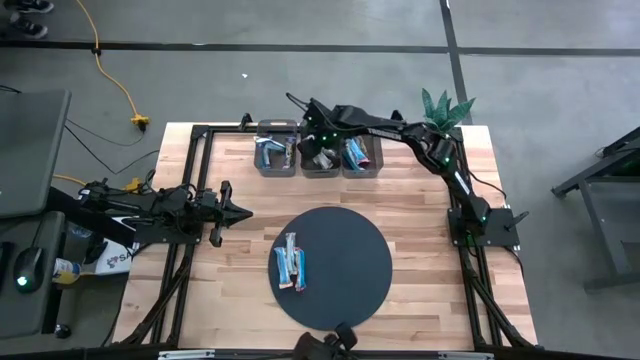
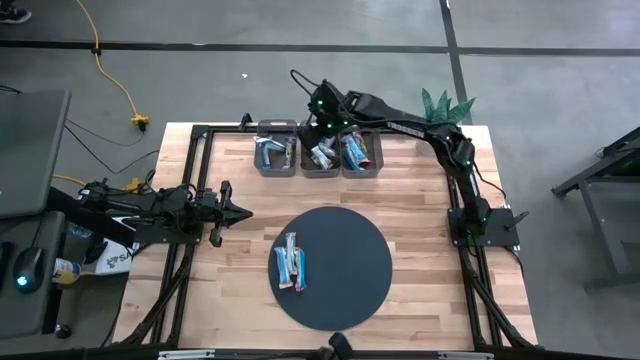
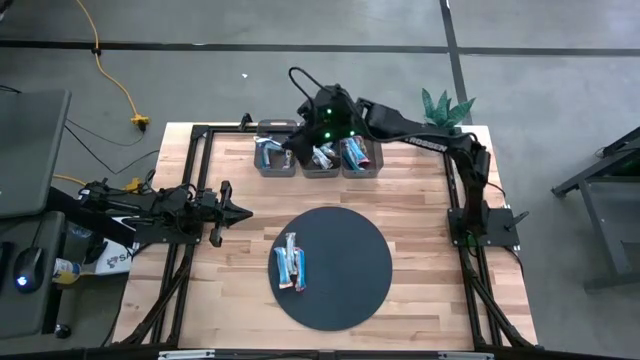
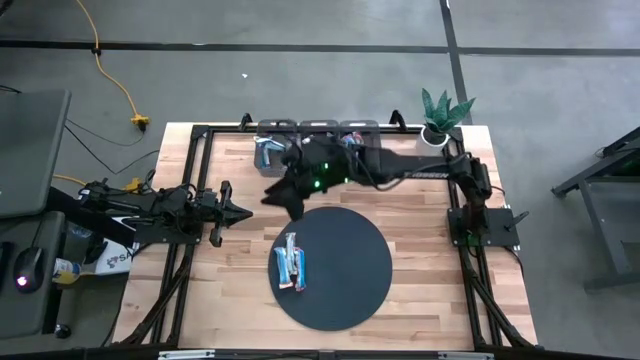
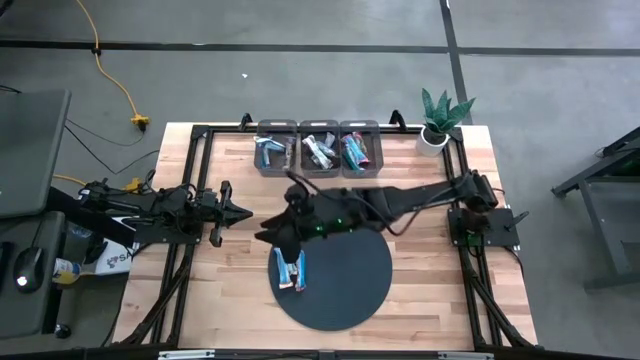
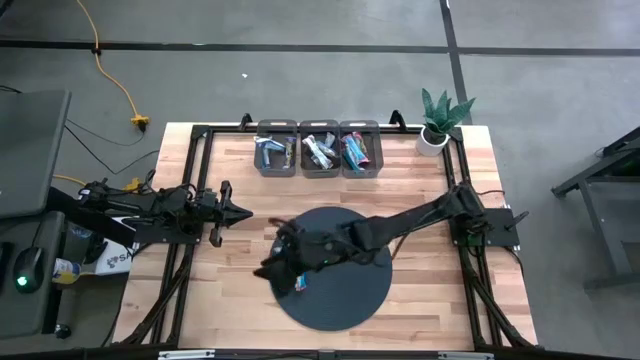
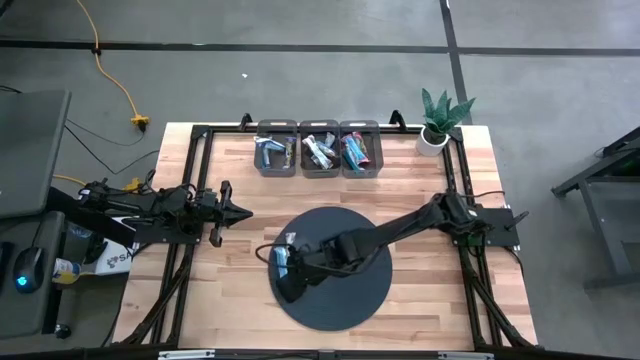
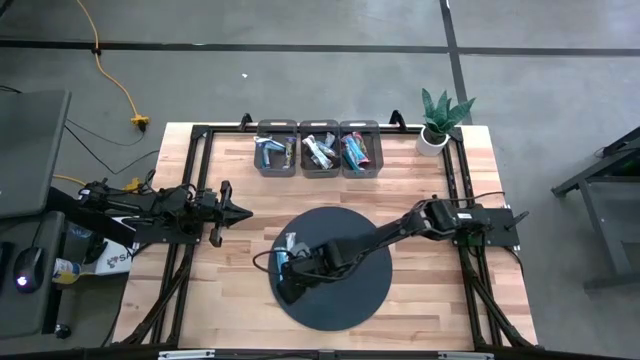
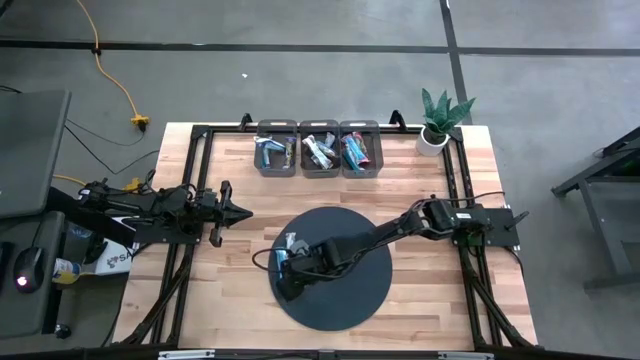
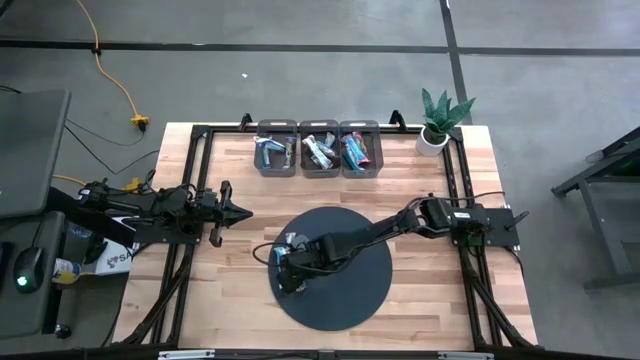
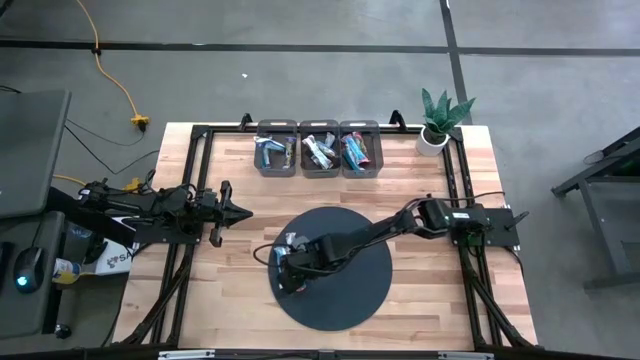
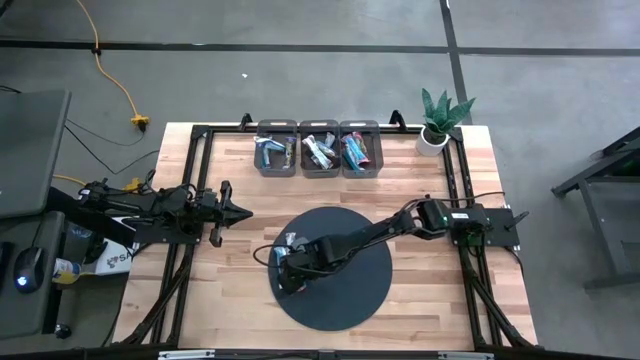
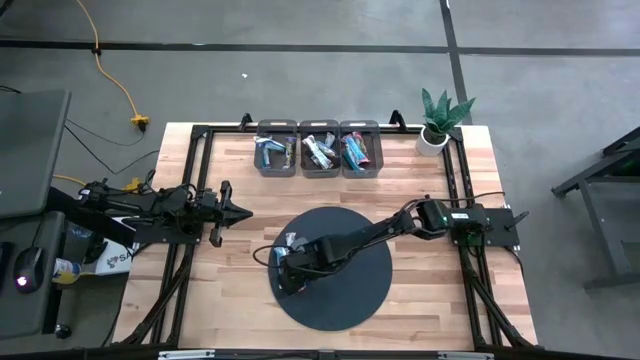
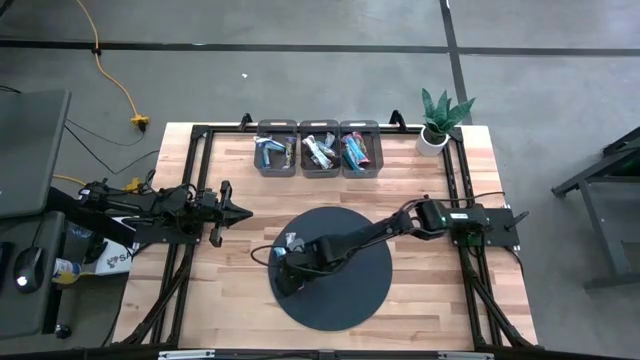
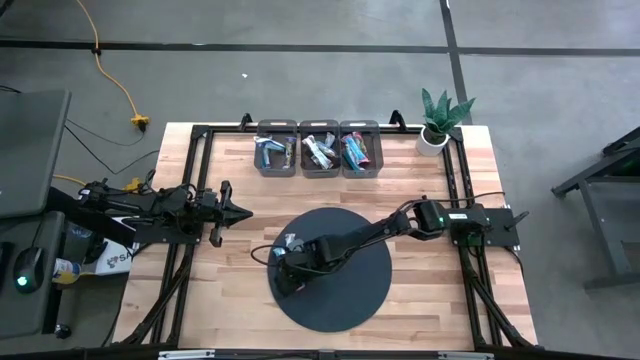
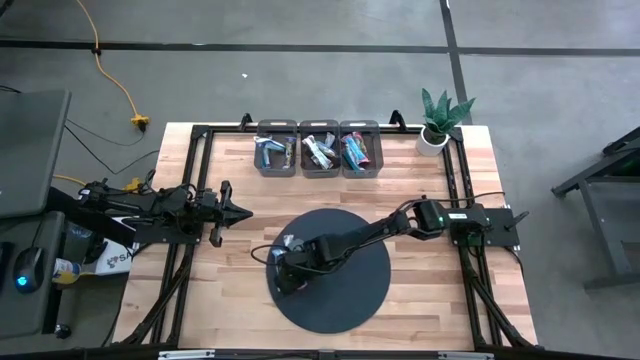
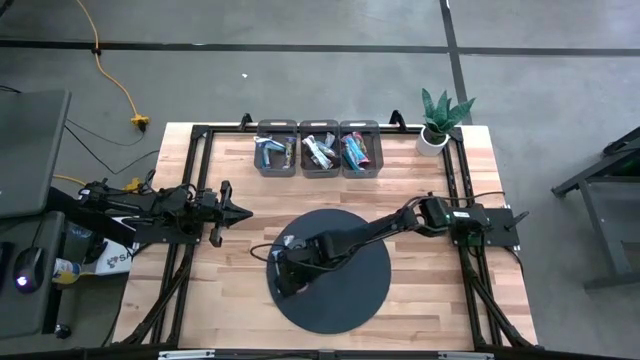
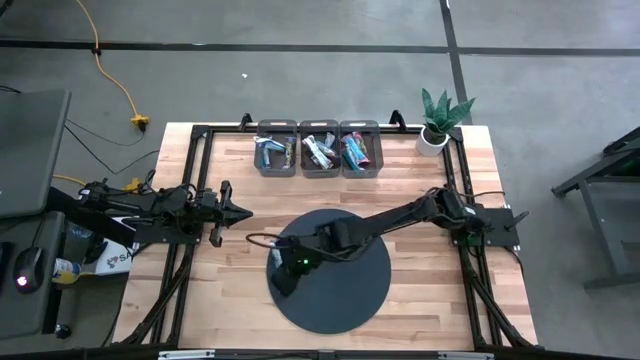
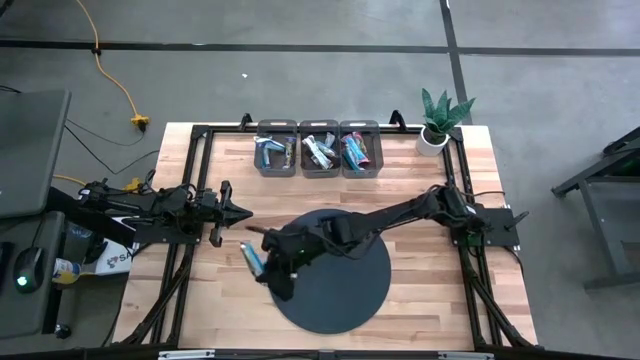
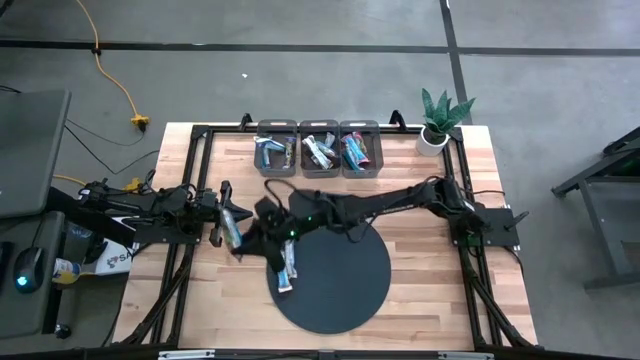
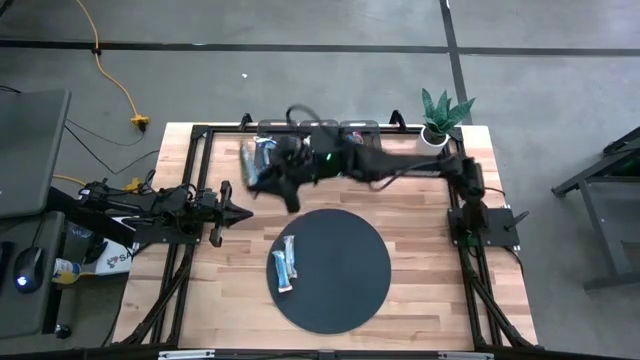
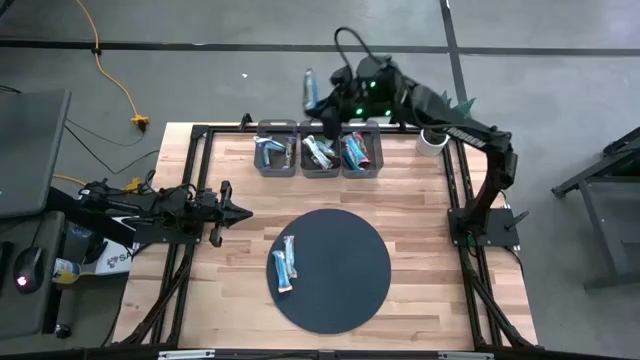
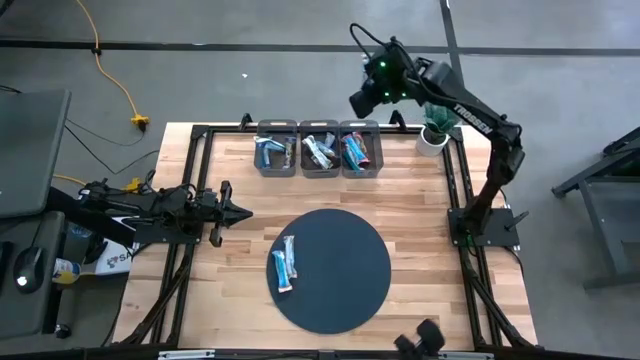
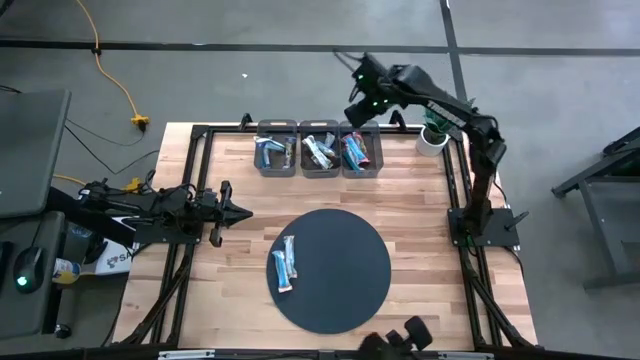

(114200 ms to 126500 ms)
Task: Pick and place Granola Bars by type
Put the red granola bar into the right black bin

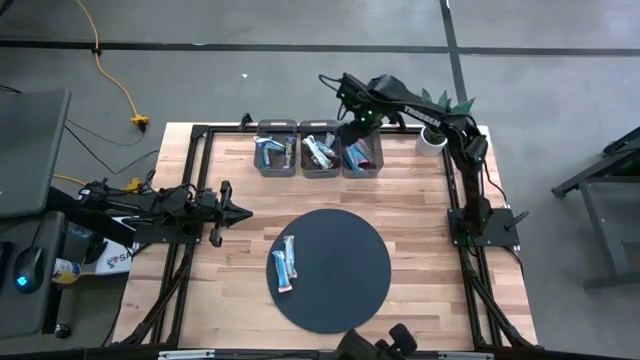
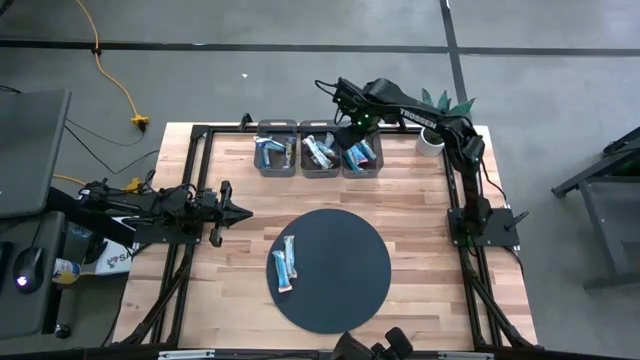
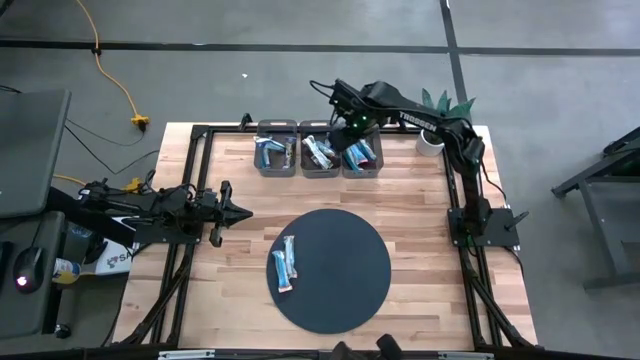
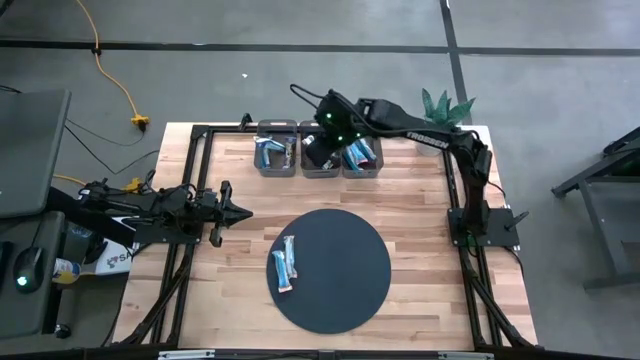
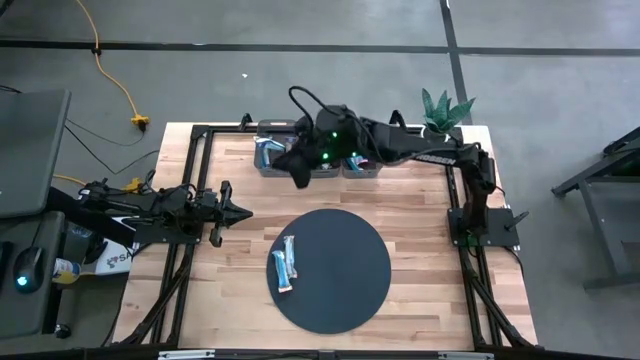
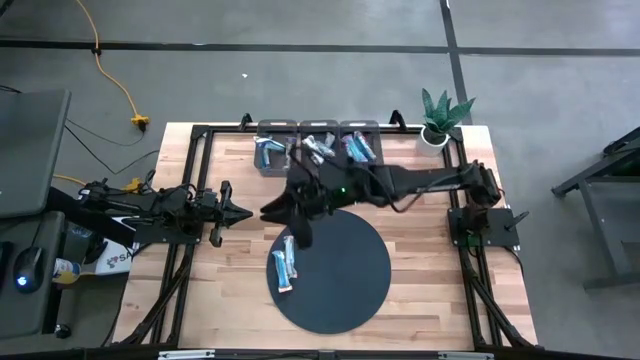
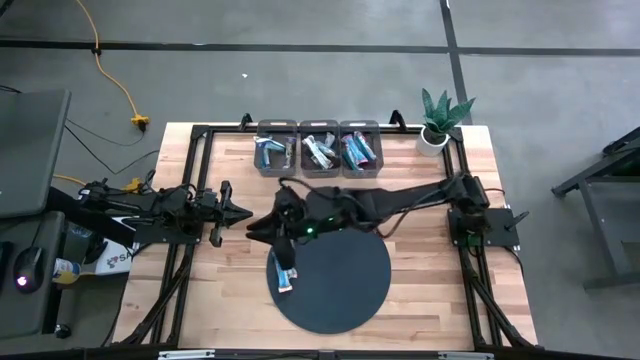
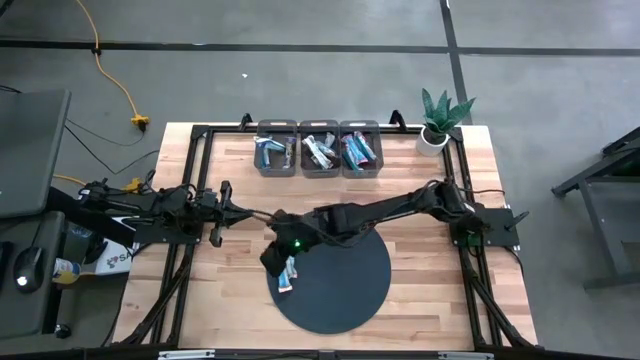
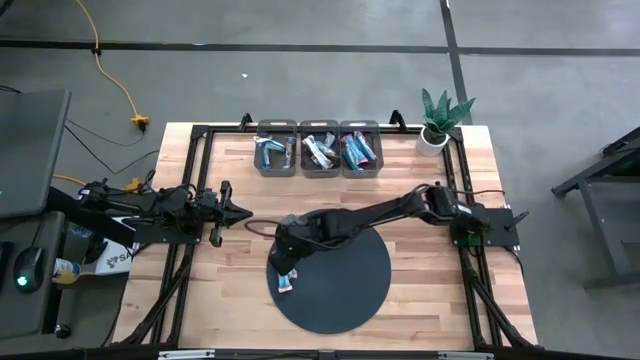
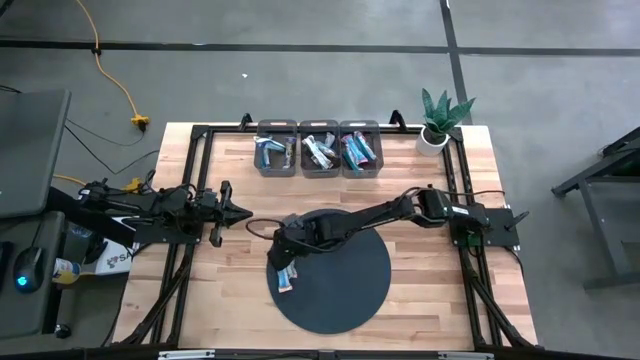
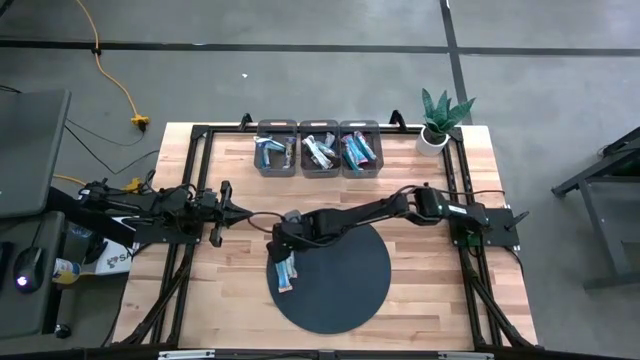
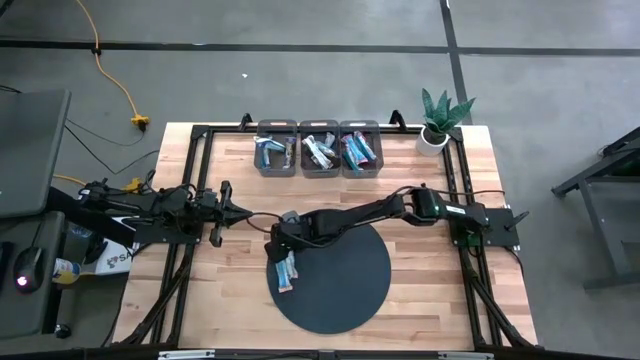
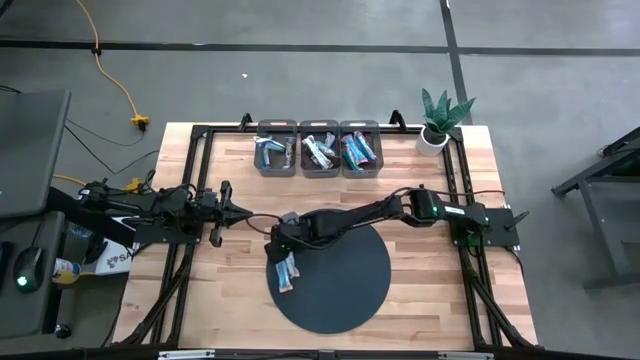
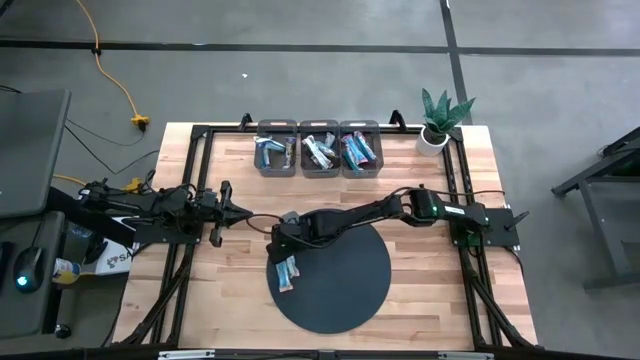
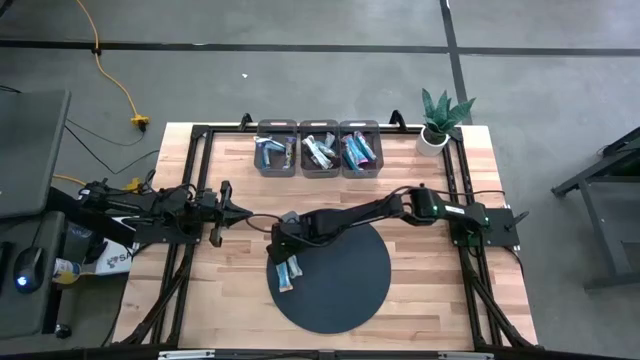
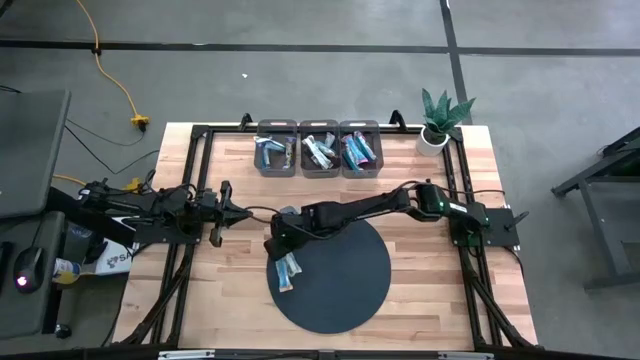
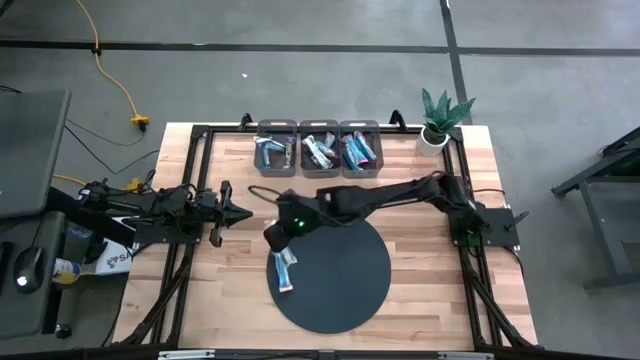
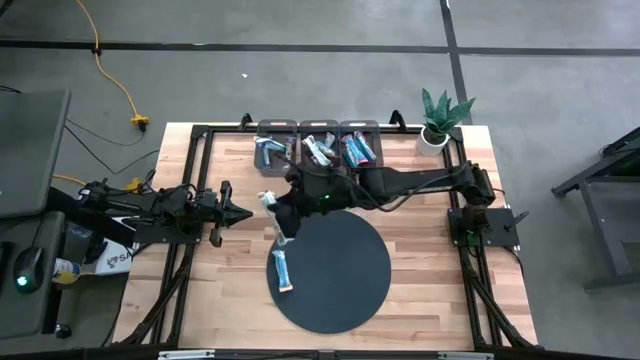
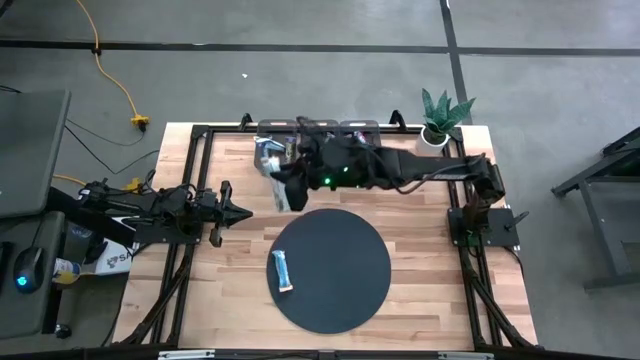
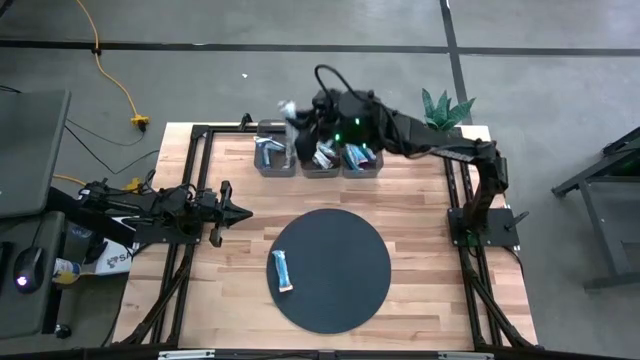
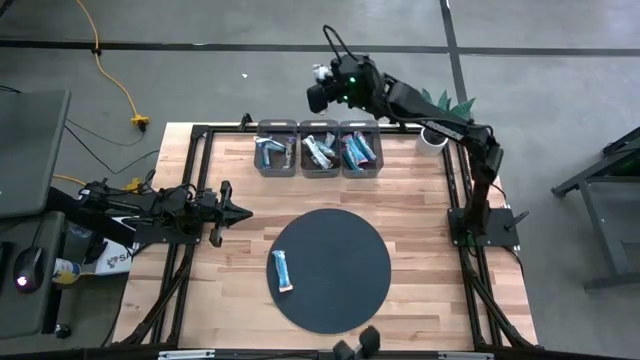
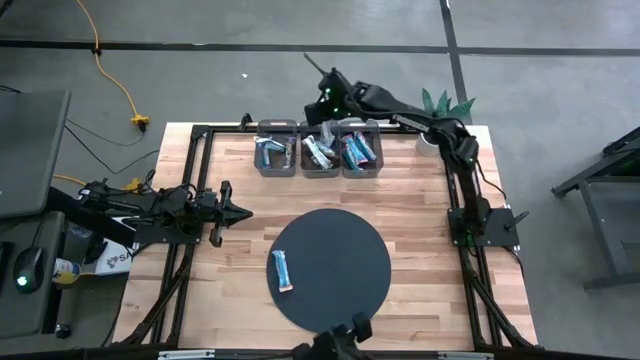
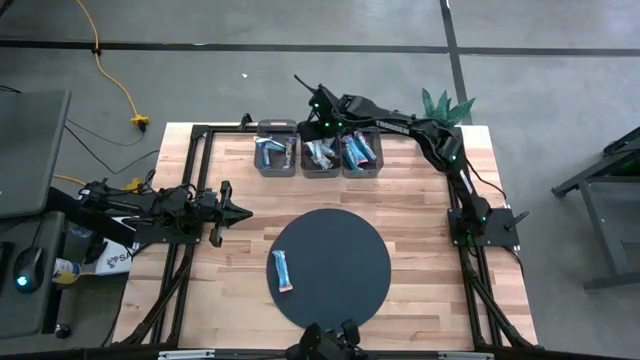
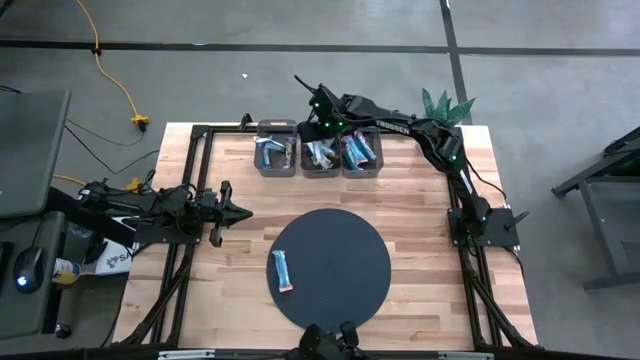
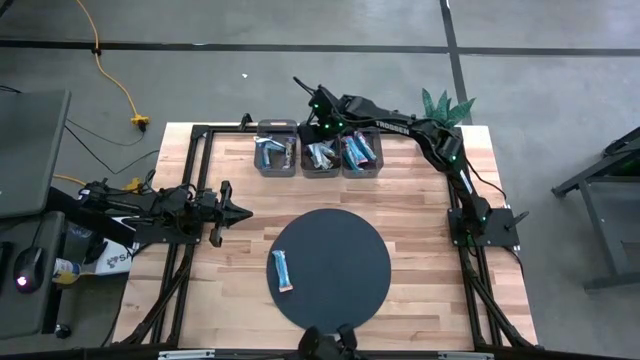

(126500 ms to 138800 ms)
Put the yellow granola bar into the middle black bin
